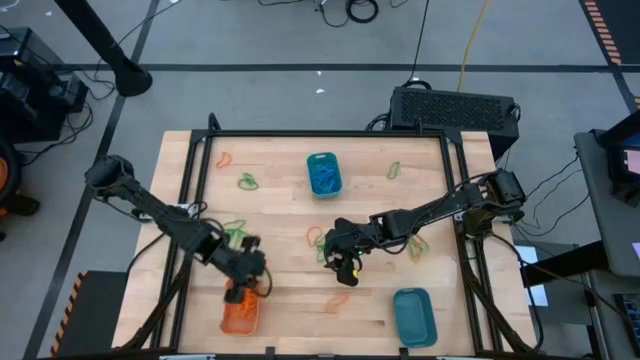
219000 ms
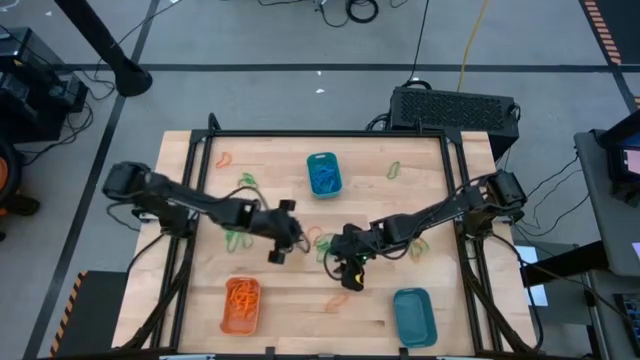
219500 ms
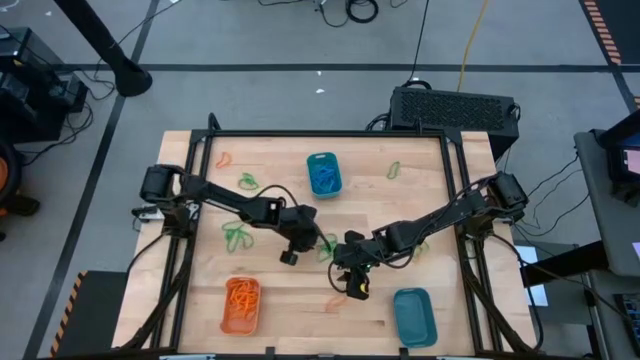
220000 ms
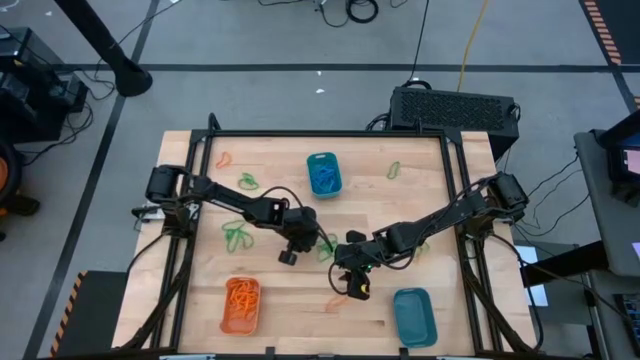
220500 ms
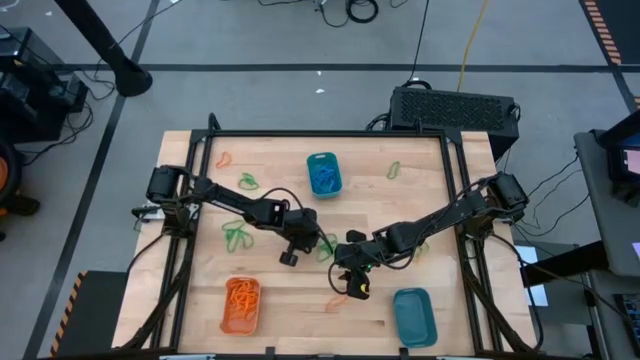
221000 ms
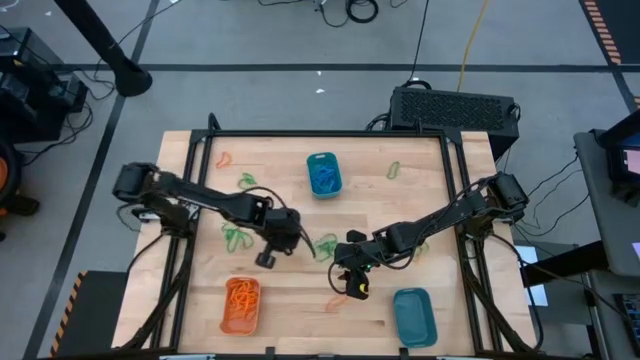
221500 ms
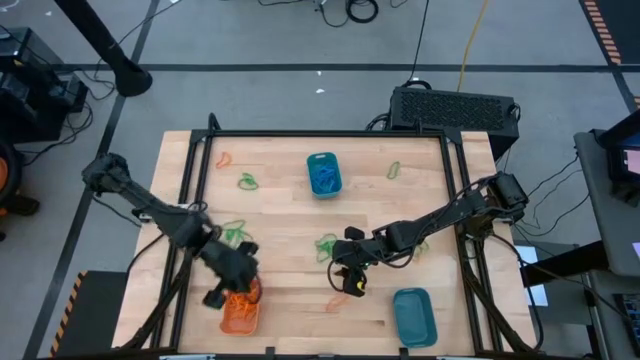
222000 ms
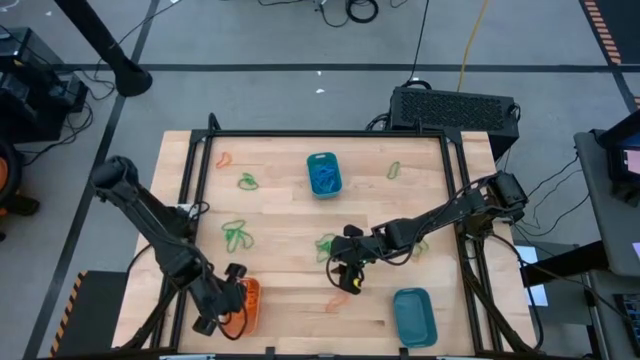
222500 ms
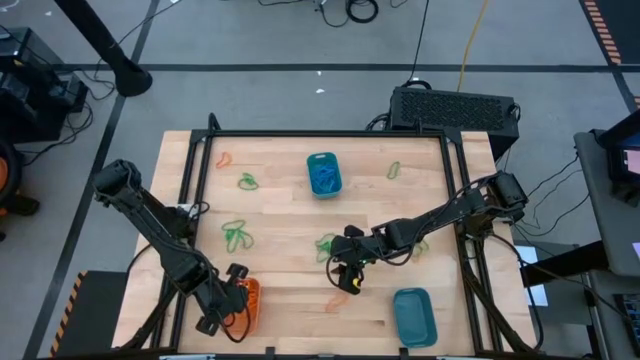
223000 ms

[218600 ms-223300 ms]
Task: Sort rubber bands into baskets
Put the orange rubber band into the orange bin

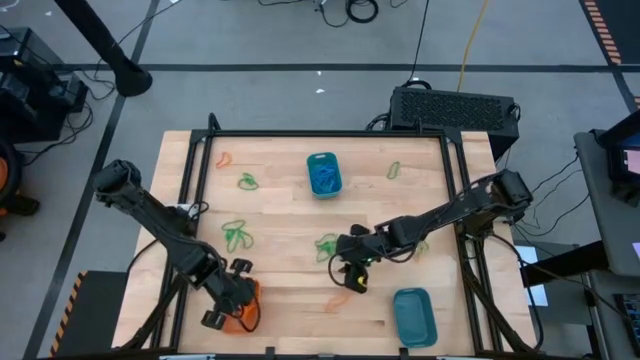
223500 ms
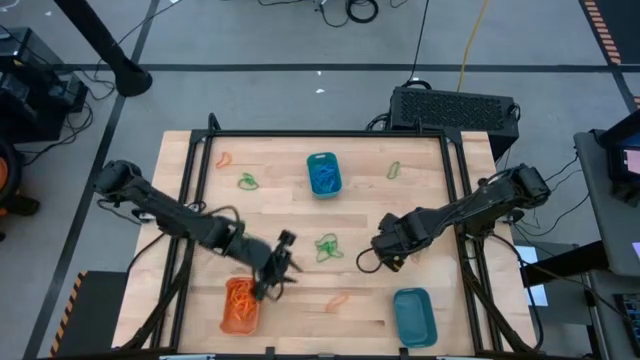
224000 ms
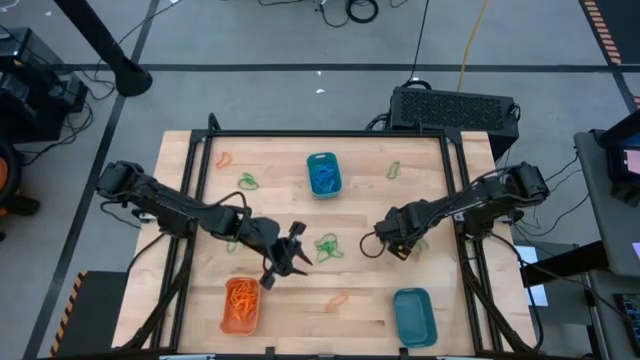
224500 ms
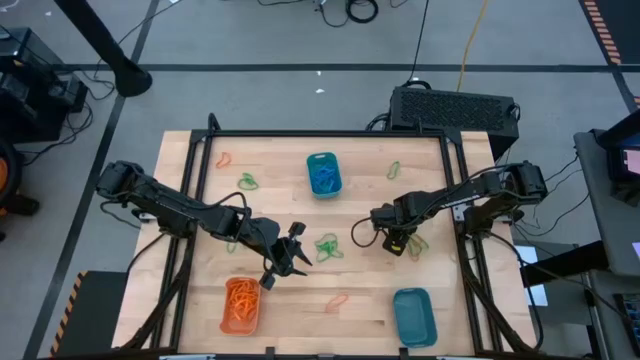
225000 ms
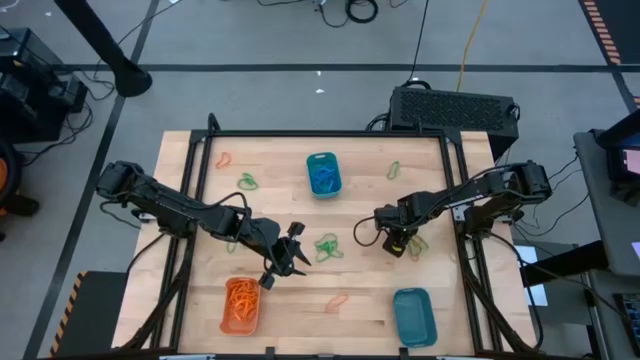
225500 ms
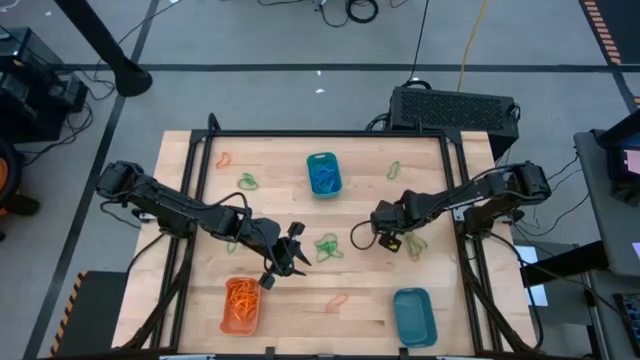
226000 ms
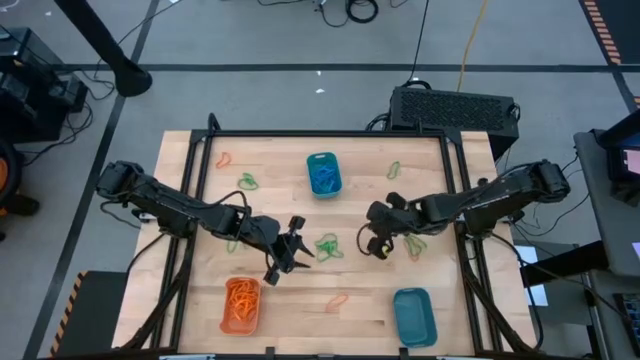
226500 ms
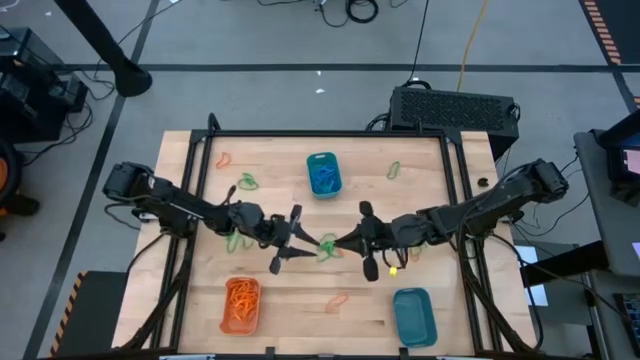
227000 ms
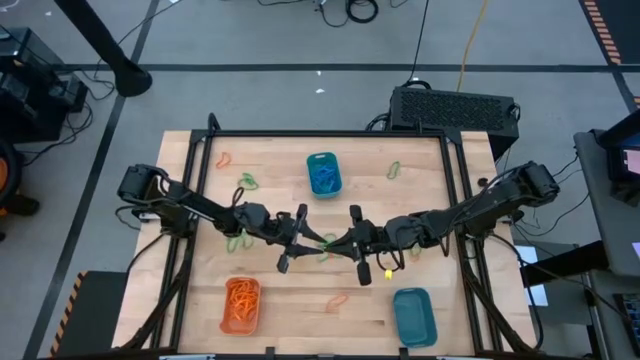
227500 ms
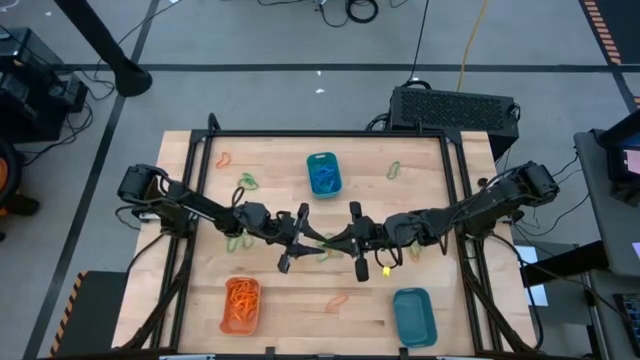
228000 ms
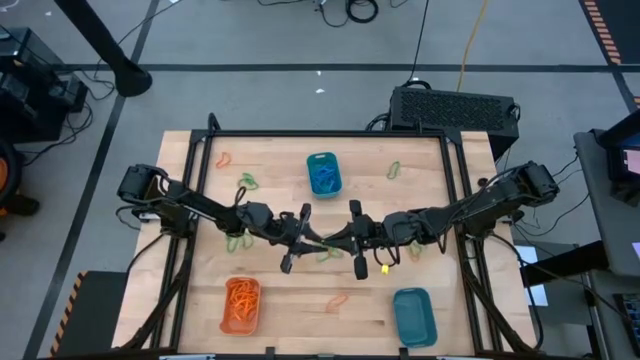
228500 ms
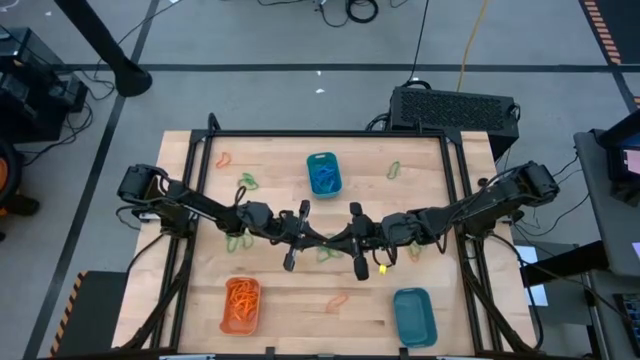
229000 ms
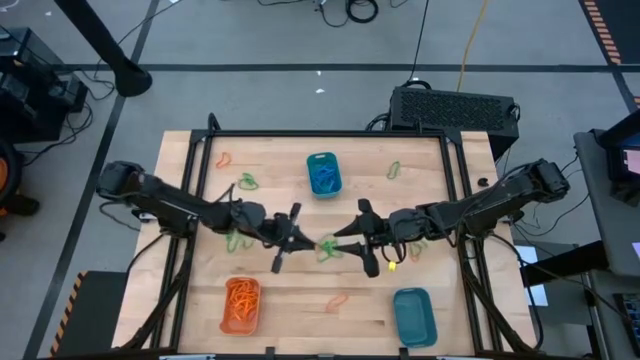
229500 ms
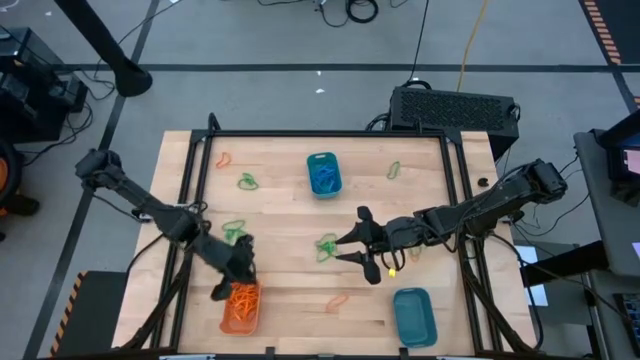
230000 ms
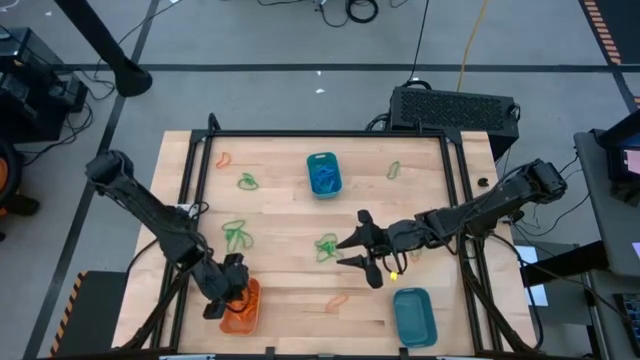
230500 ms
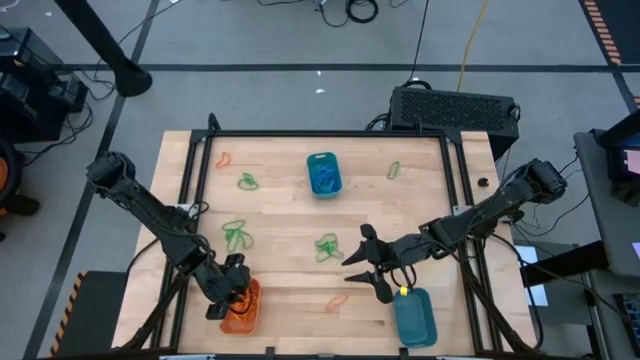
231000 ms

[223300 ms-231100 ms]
Put the orange rubber band into the orange bin

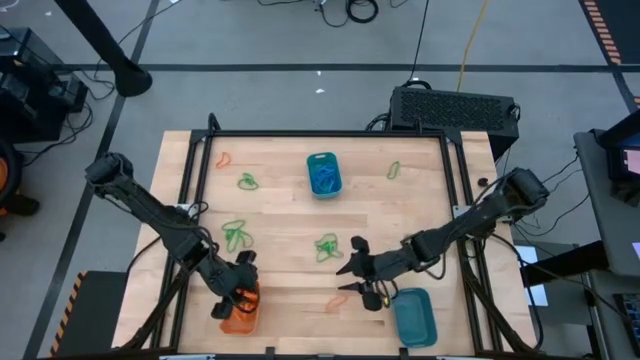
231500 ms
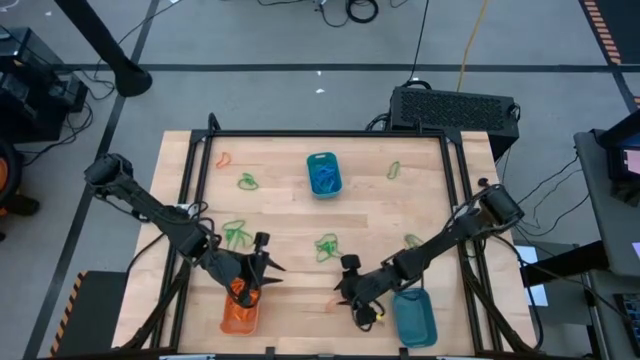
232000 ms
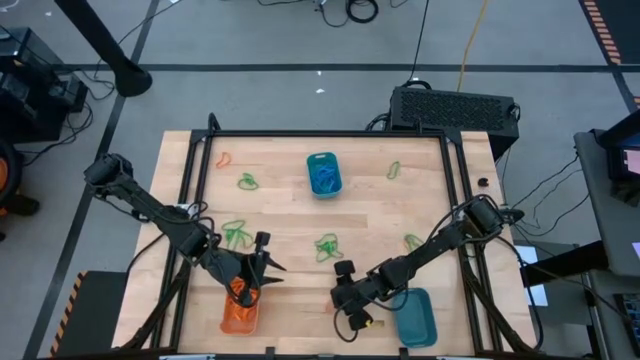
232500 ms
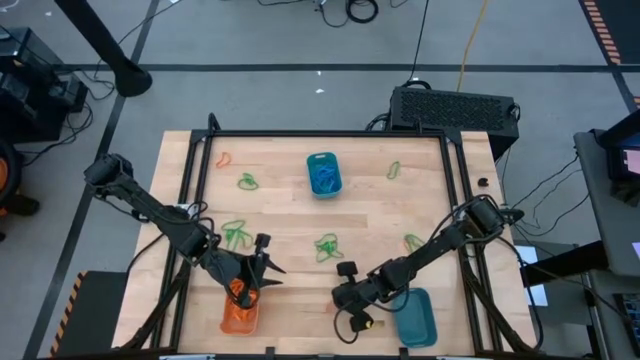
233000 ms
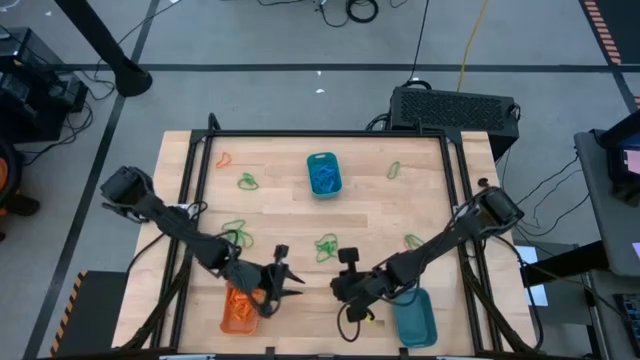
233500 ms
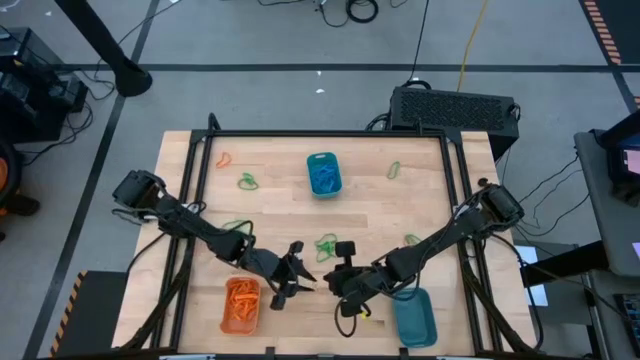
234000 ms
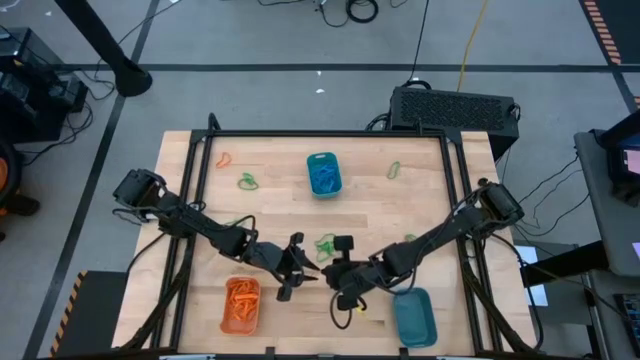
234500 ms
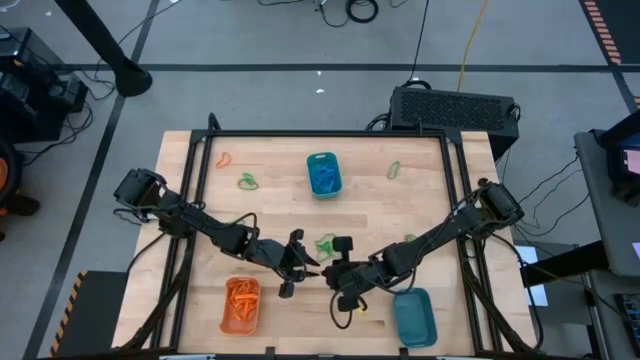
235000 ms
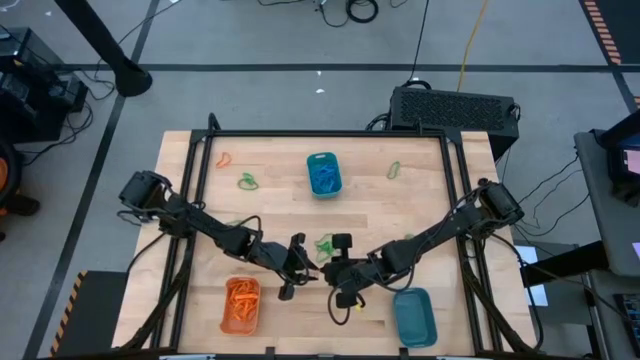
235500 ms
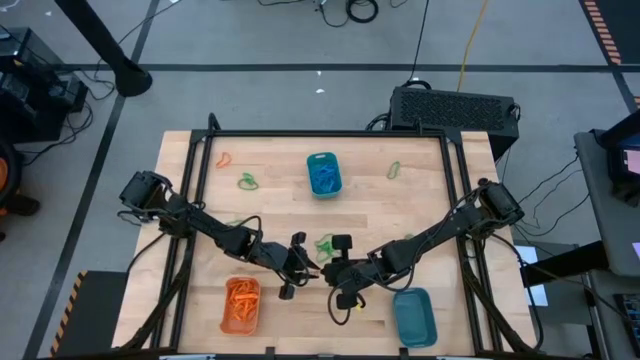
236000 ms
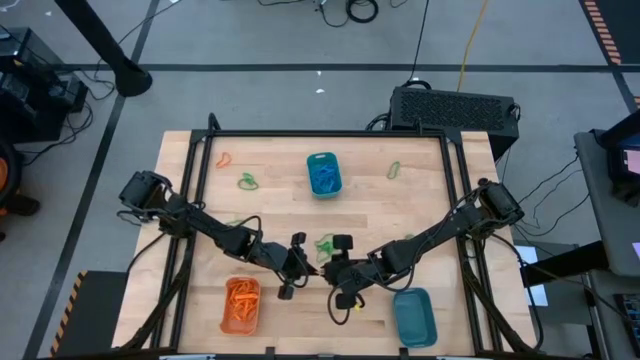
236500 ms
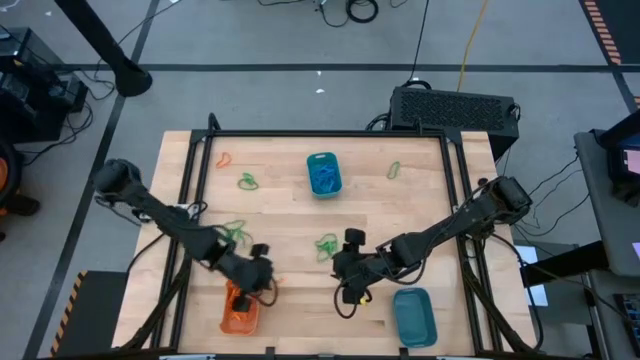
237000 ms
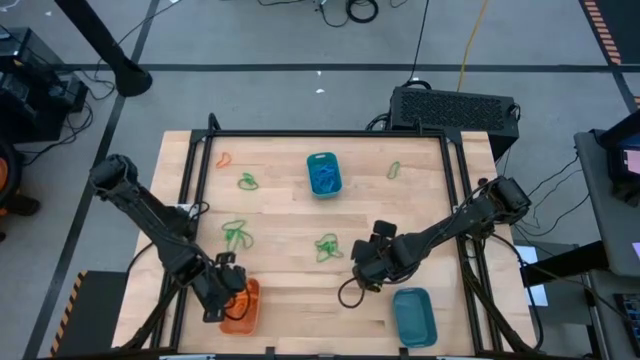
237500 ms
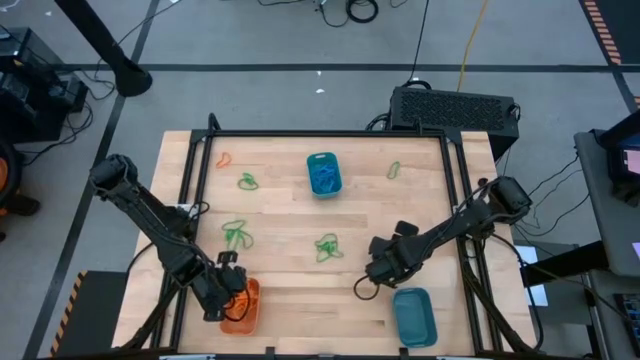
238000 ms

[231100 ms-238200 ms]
Put the orange rubber band into the orange bin

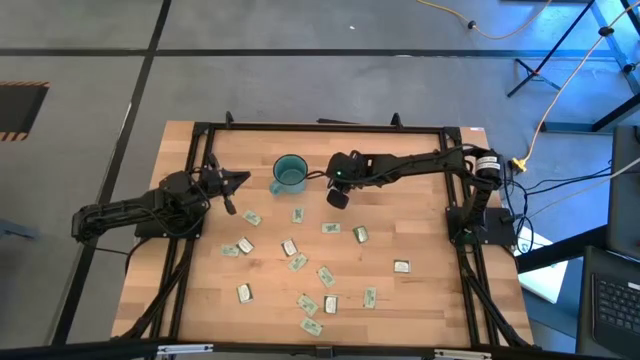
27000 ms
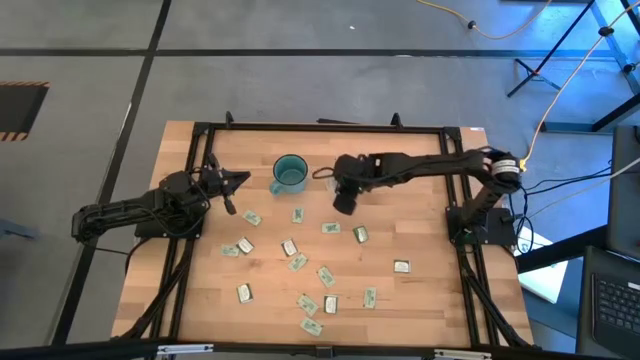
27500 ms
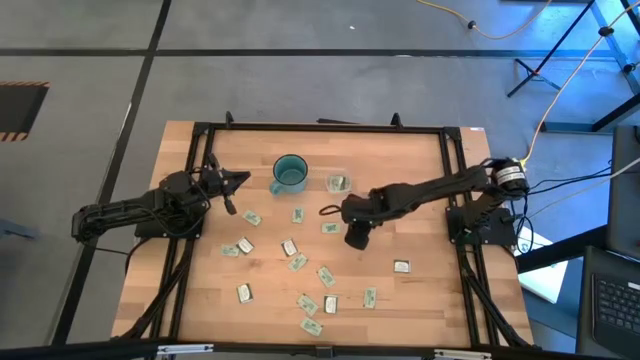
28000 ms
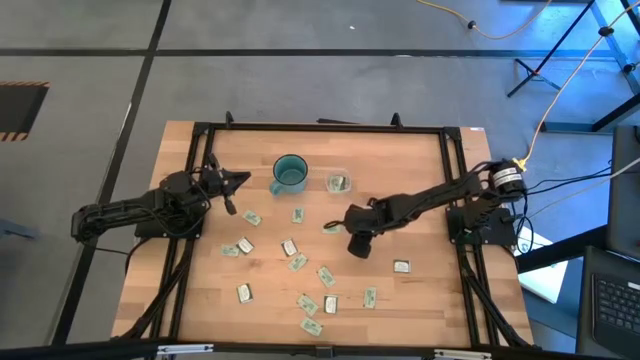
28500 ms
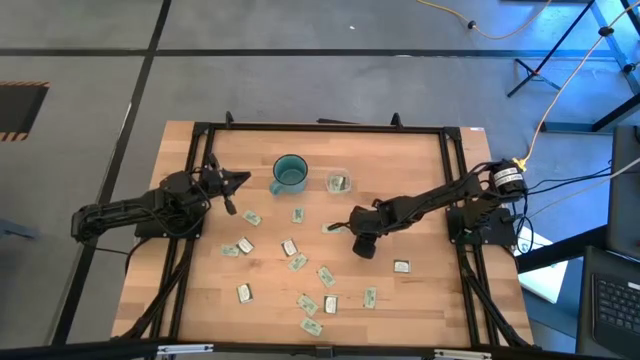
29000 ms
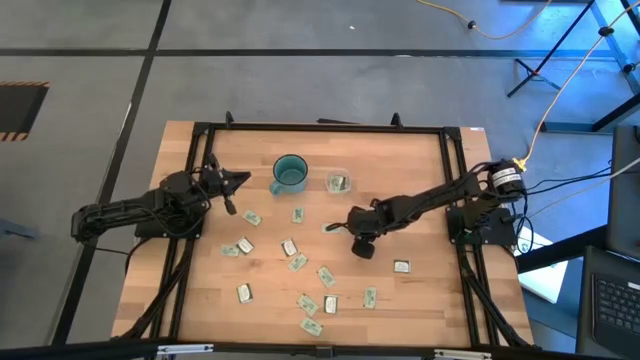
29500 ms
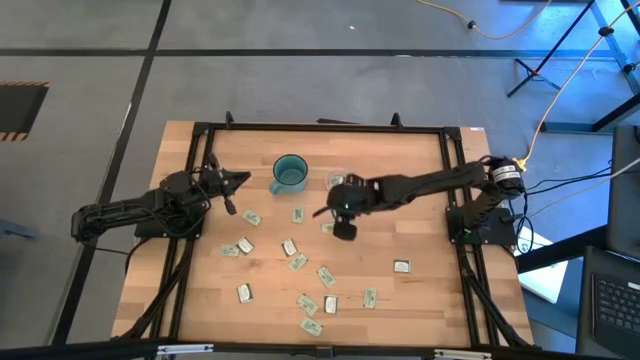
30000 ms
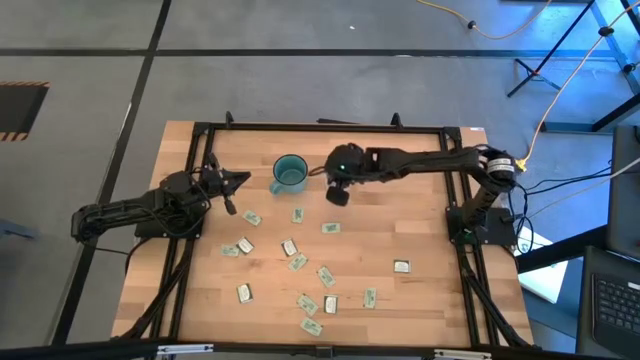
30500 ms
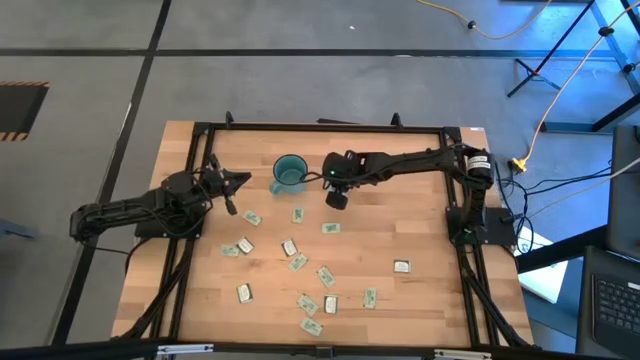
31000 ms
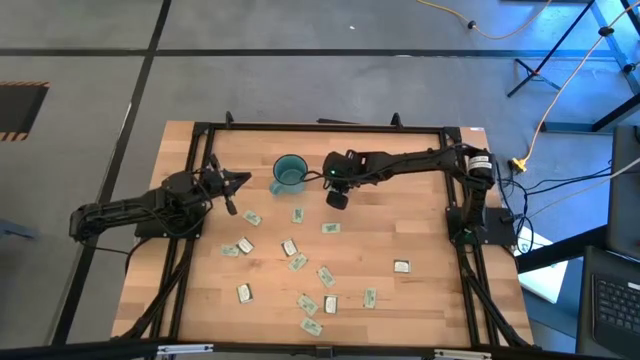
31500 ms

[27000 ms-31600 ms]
Task: Pick and place items into bin
Put the green stevia packet into the transparent bin
